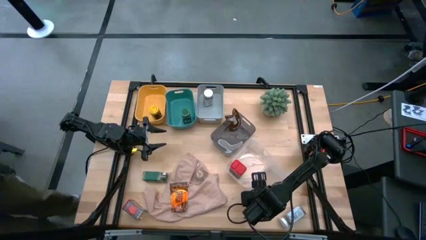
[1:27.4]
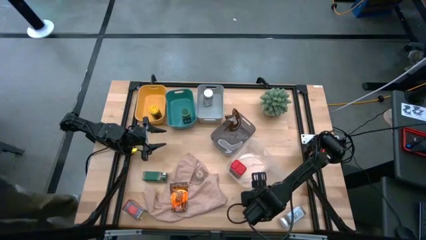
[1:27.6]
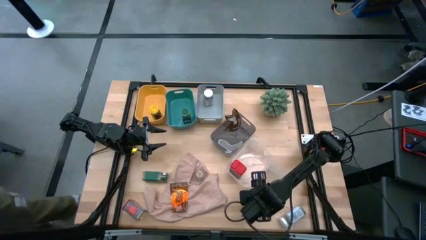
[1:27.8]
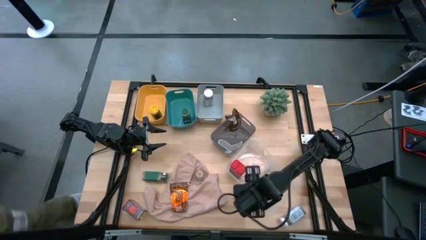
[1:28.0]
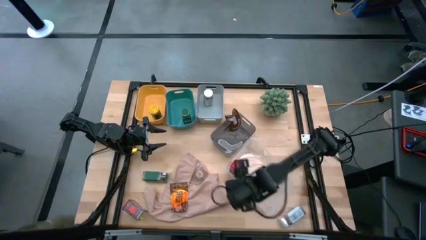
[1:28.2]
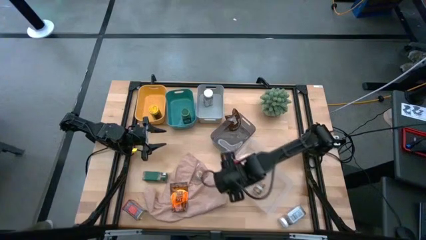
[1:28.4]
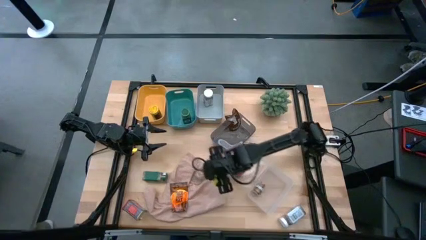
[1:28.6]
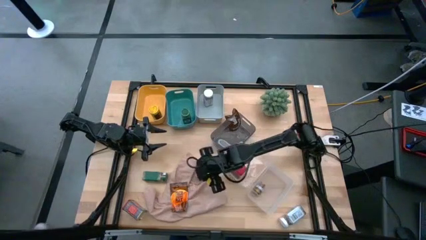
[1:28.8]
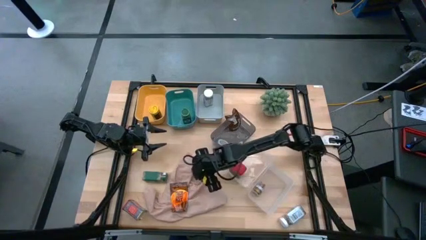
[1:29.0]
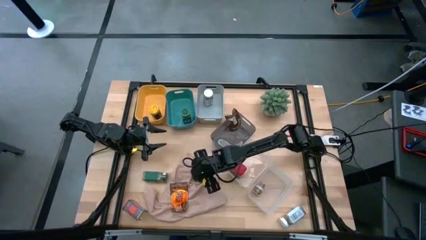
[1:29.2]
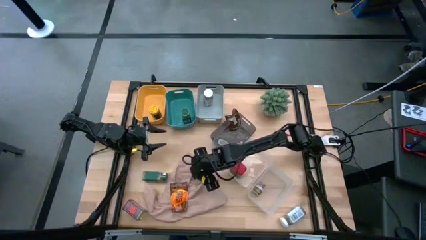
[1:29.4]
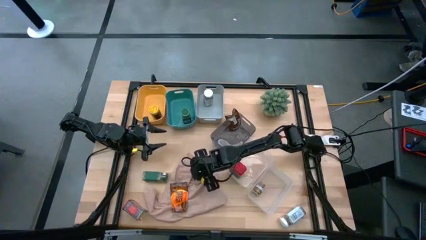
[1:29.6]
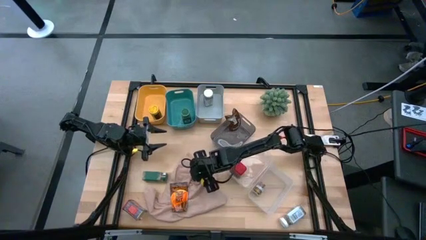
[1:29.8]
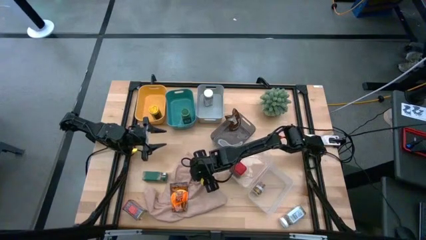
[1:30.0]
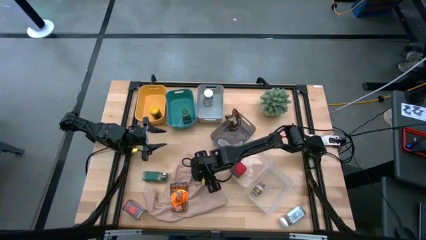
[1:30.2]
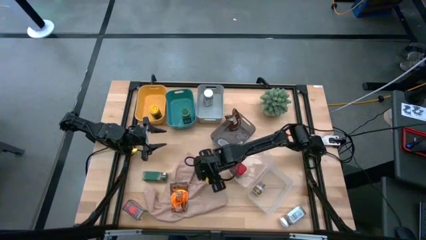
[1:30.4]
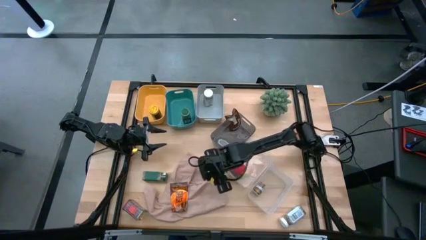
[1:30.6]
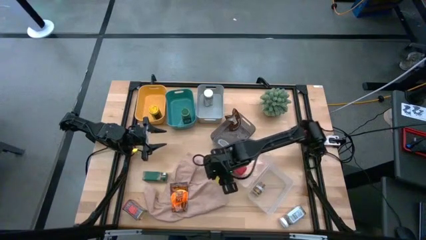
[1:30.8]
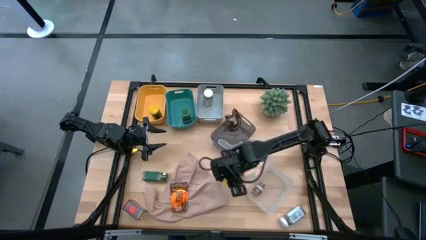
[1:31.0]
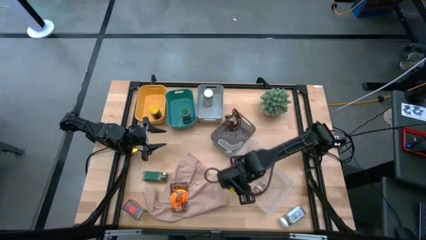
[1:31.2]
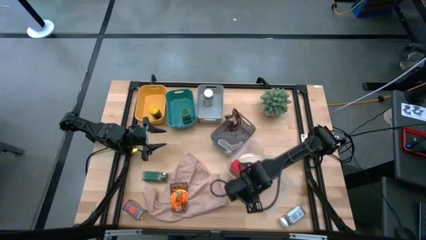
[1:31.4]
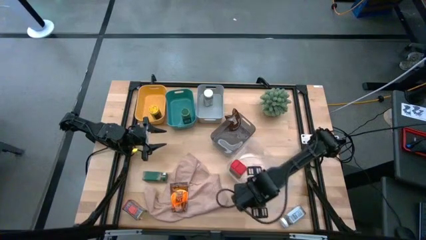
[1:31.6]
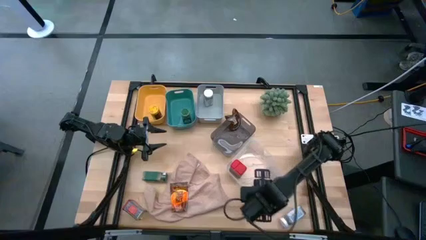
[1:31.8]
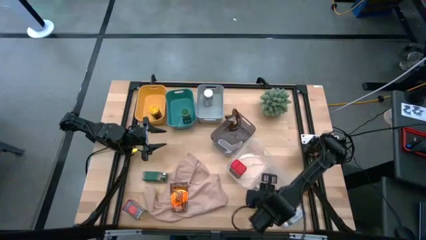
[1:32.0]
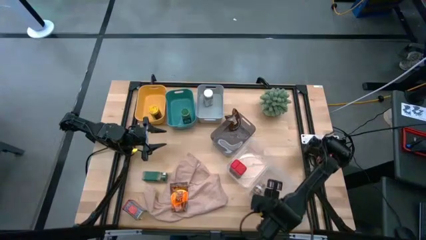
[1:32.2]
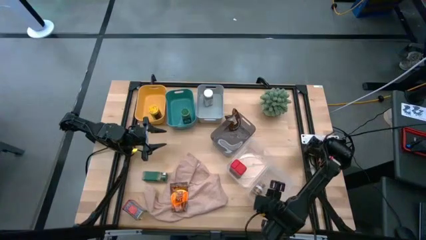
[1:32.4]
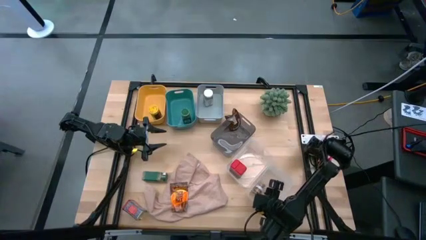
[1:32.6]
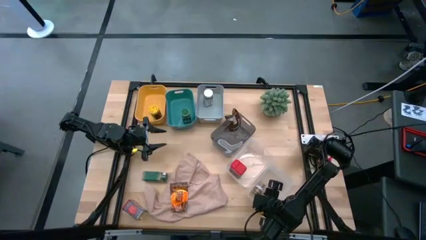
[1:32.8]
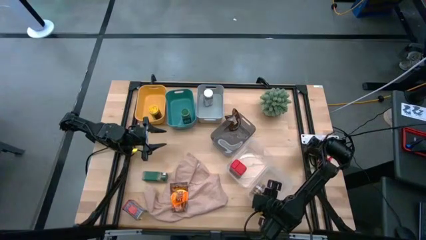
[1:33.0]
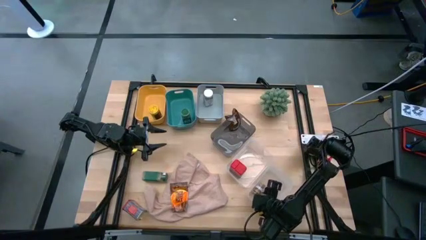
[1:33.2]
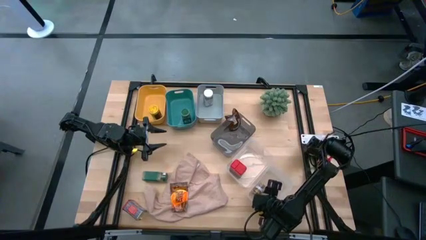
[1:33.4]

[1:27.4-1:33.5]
Task: Sort spices by type
Put the brown seasoning bottle into the right transparent bin

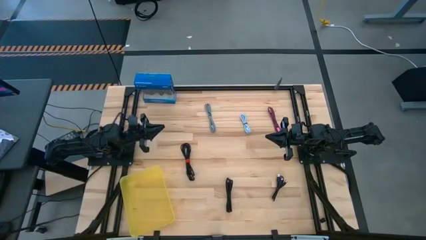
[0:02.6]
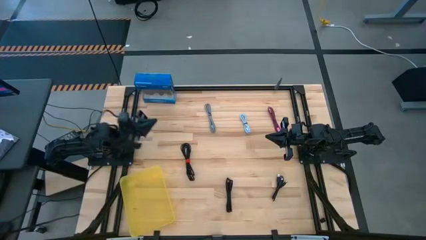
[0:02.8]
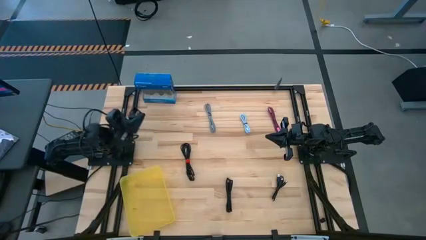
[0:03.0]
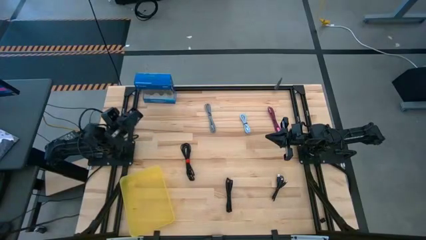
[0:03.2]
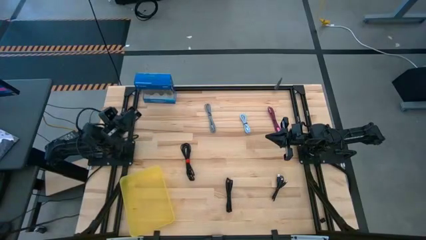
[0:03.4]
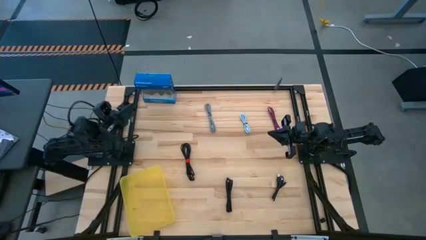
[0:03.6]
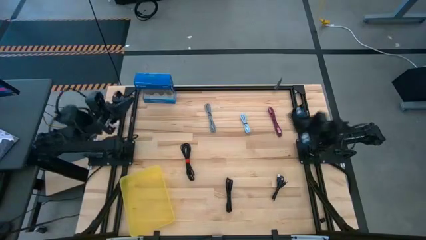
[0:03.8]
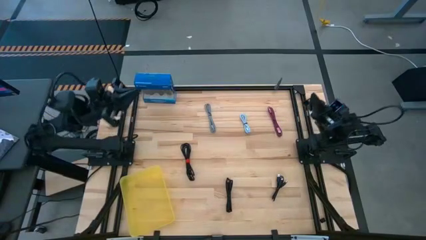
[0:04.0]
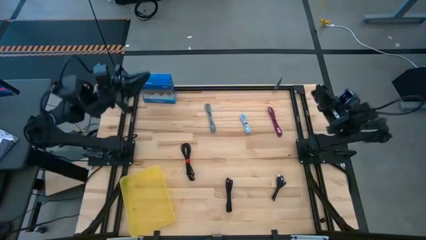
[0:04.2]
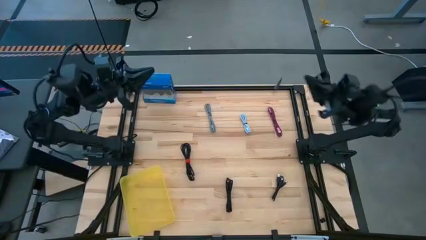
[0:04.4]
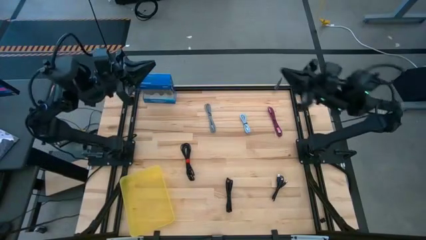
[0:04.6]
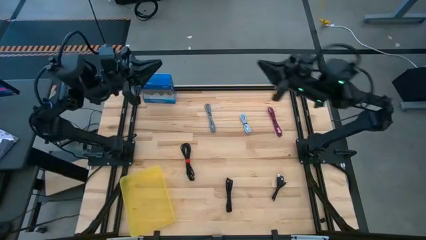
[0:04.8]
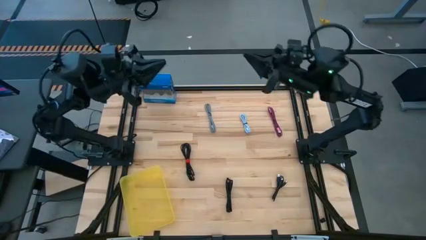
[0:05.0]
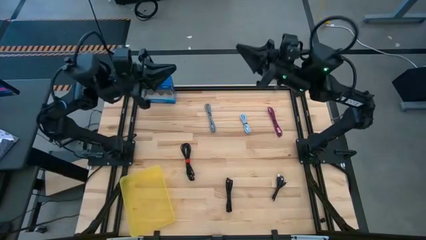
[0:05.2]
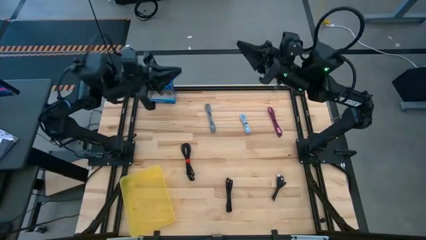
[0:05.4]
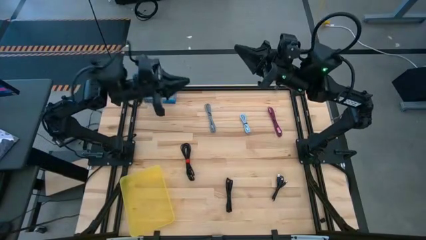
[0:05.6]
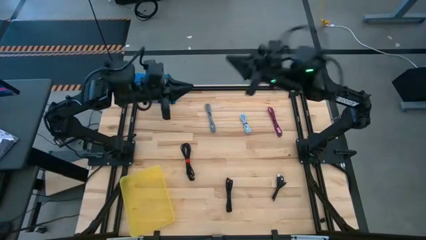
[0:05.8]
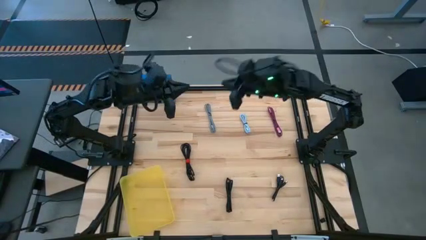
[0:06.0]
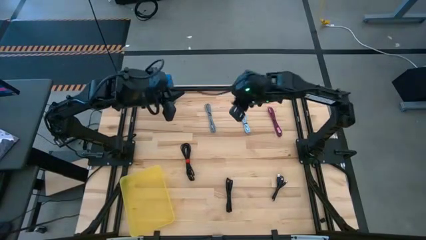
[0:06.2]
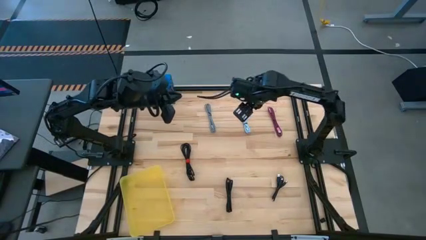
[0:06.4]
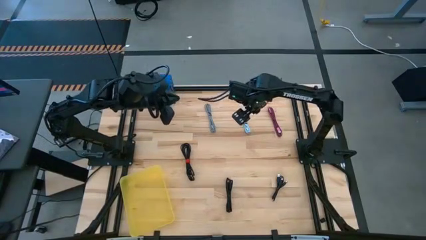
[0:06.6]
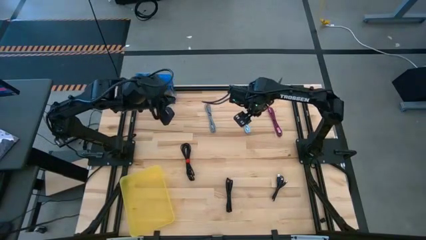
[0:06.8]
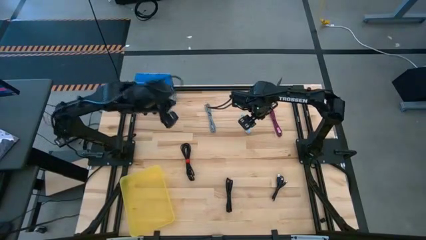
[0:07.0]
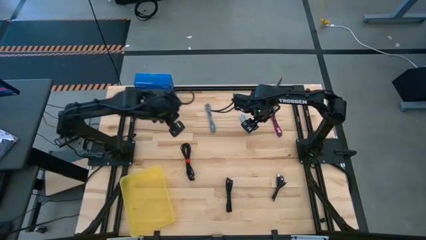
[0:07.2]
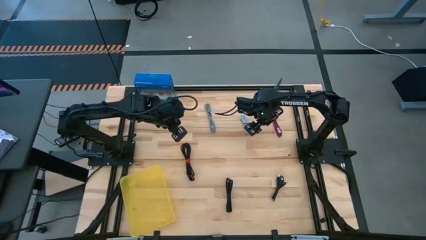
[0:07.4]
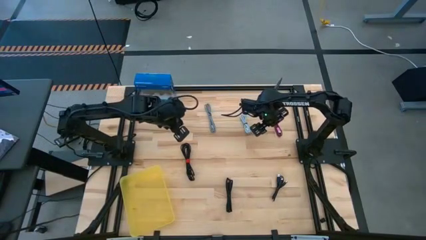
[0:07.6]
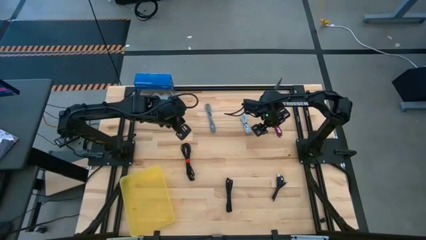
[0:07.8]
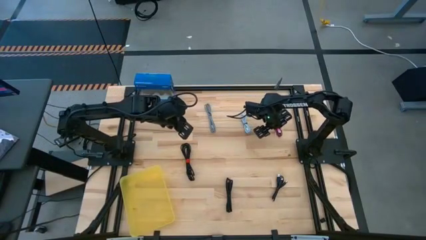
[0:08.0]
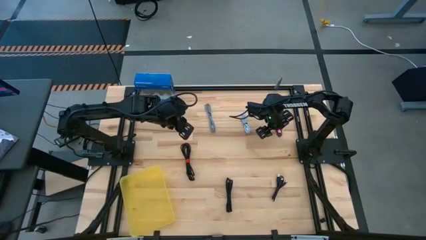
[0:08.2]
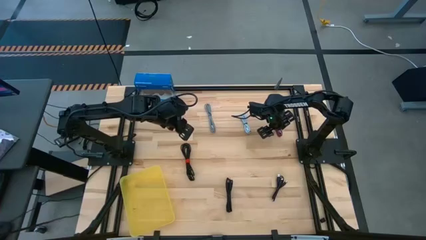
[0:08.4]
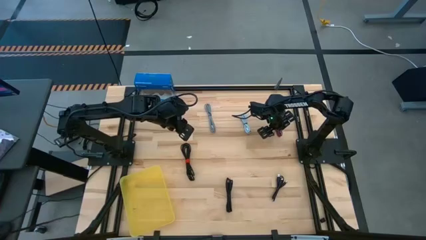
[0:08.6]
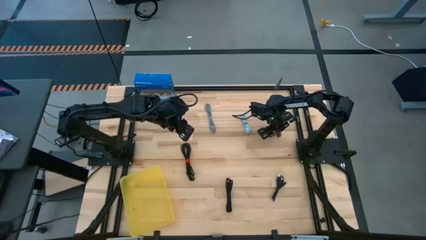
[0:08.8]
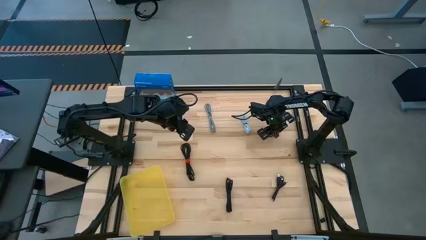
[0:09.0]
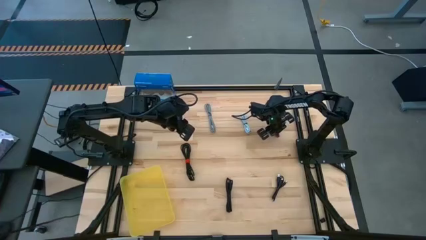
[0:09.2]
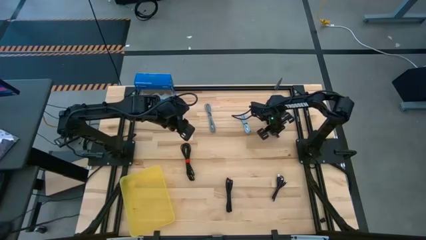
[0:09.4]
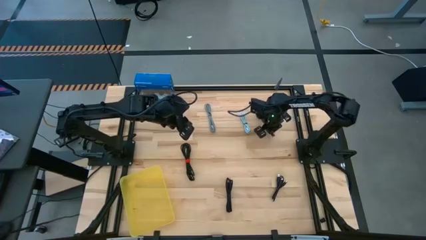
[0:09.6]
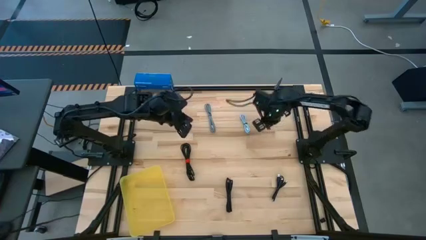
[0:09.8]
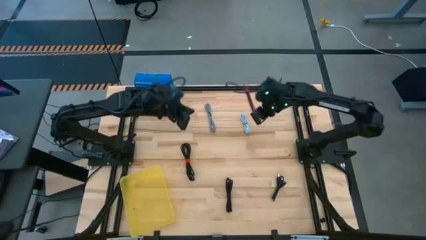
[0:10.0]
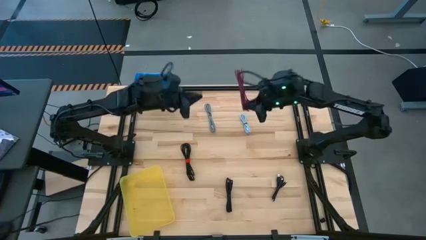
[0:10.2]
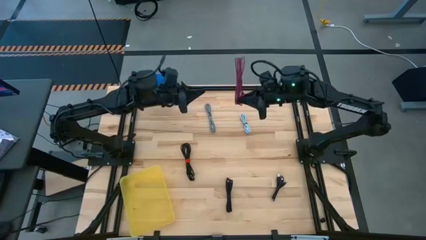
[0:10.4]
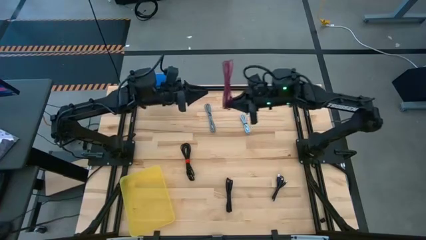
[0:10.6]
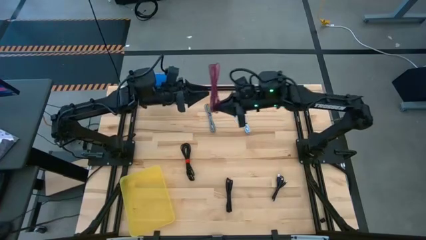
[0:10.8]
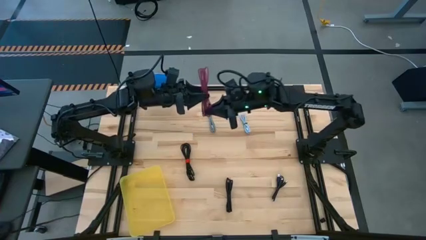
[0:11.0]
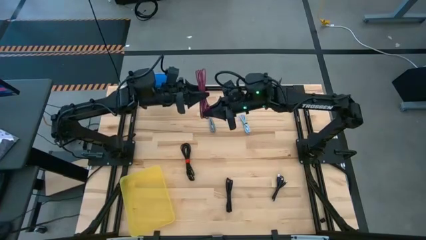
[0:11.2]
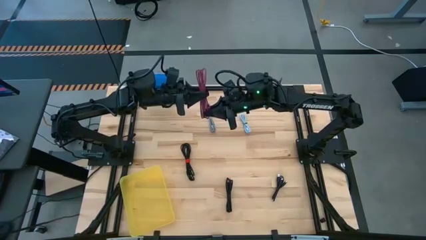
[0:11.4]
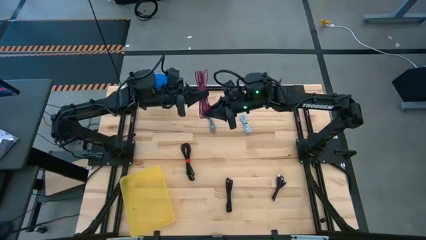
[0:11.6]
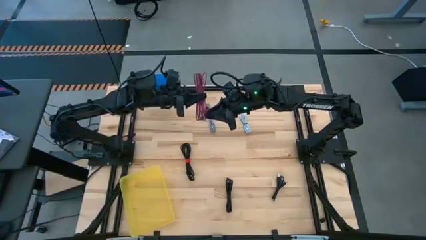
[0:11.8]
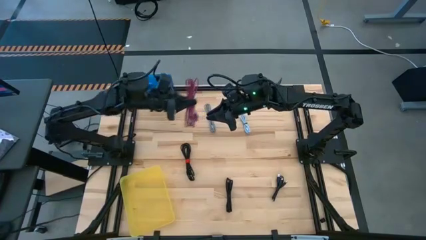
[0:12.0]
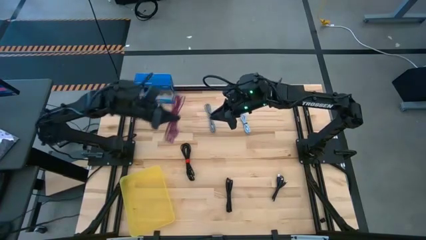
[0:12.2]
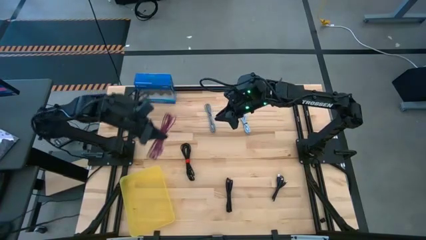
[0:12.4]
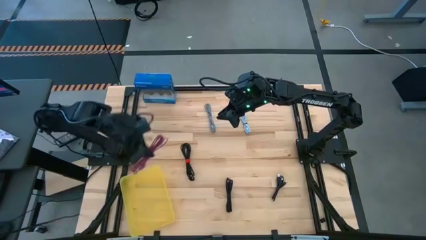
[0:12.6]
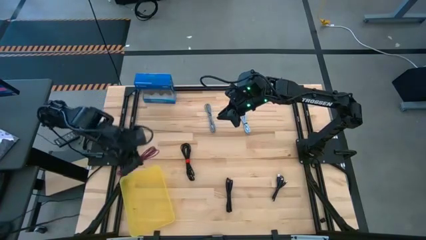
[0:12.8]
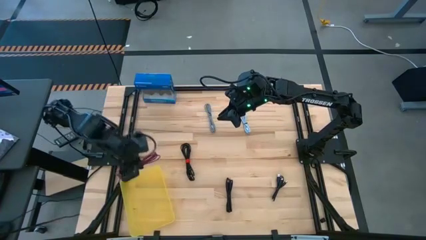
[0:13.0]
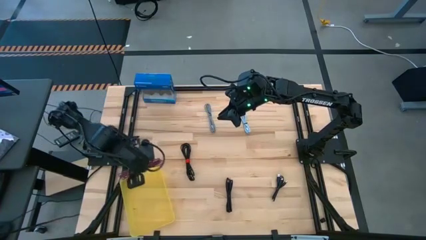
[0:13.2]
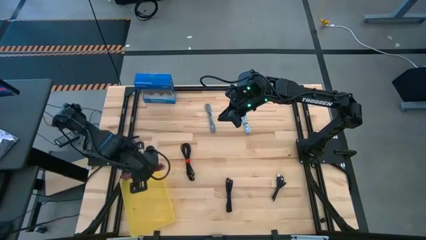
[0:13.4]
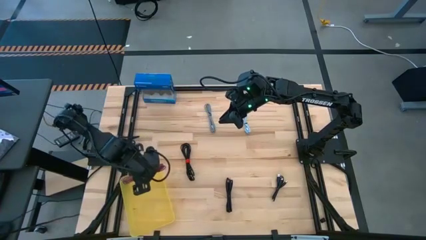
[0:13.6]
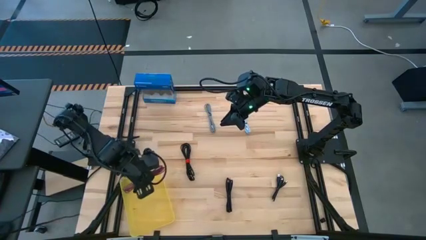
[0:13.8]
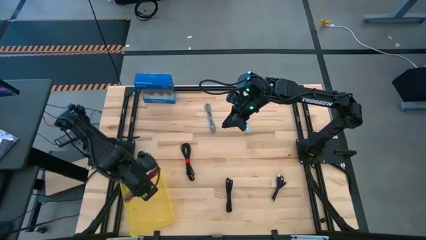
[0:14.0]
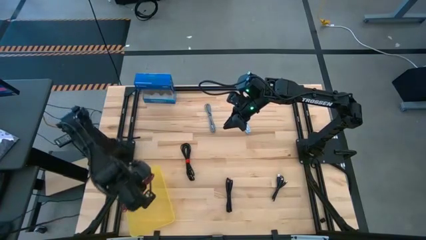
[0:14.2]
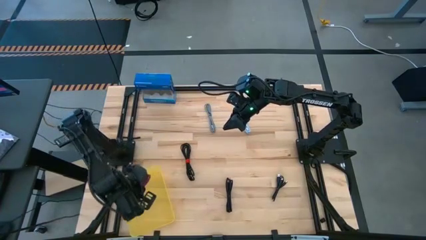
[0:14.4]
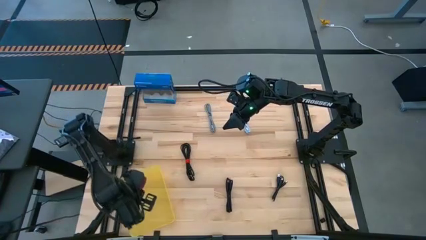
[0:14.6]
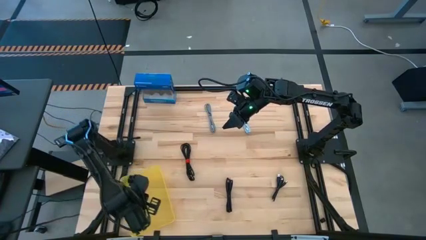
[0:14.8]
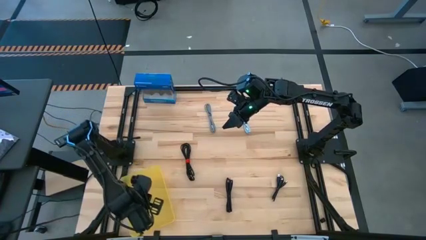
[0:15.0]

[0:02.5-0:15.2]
Task: Pick and place USB-C Cables
Put the pink charger cable into the yellow bin
